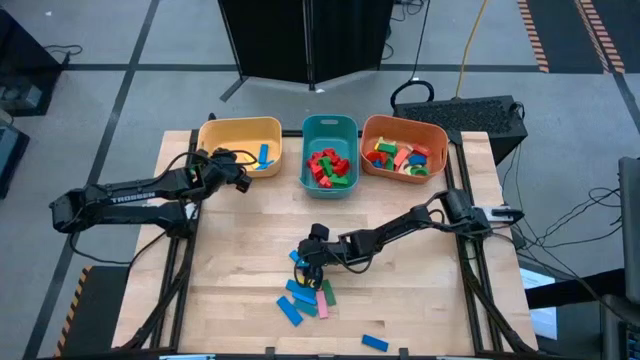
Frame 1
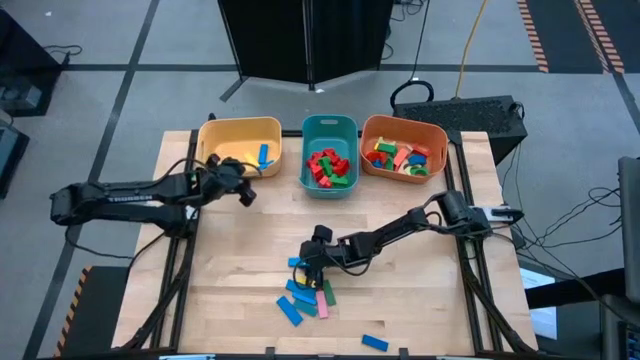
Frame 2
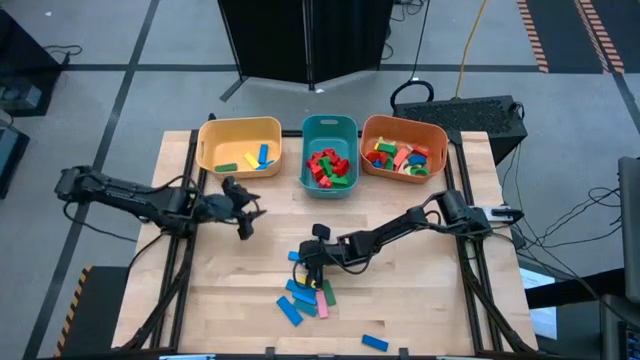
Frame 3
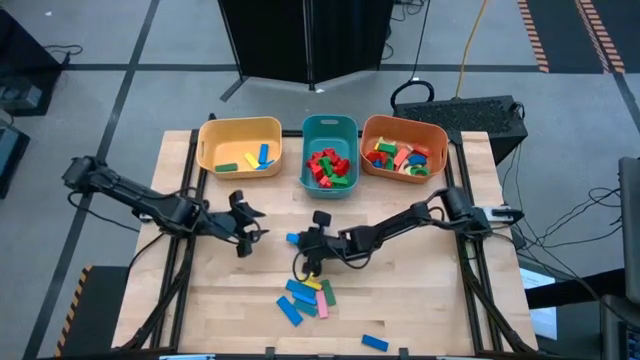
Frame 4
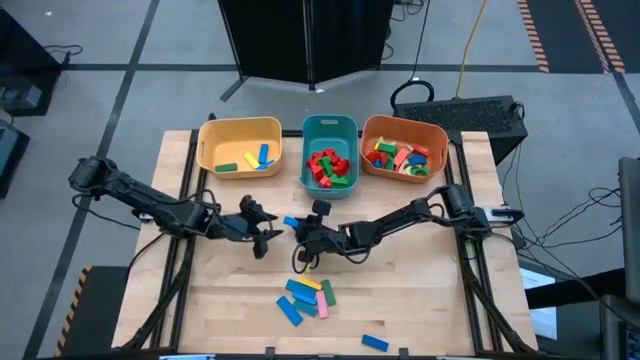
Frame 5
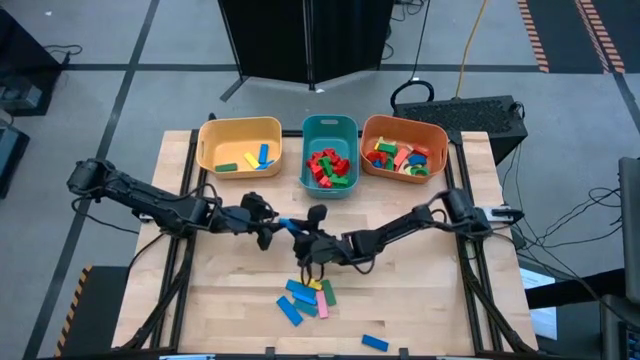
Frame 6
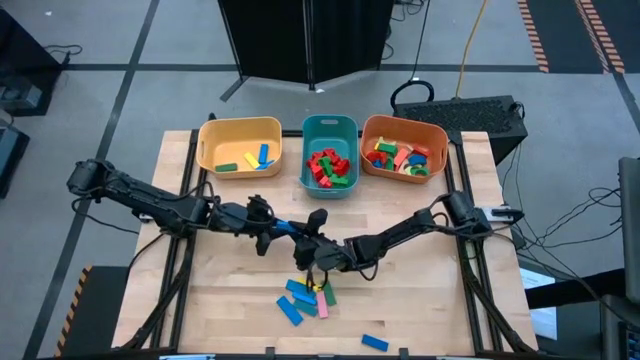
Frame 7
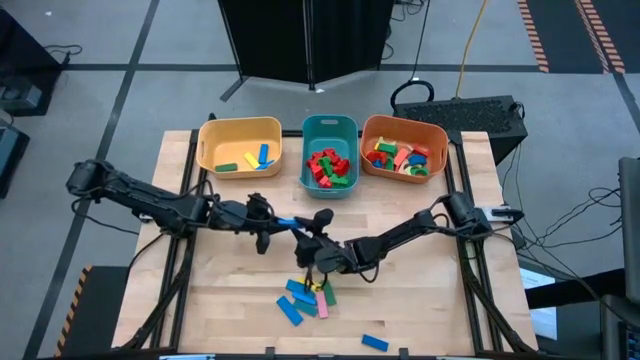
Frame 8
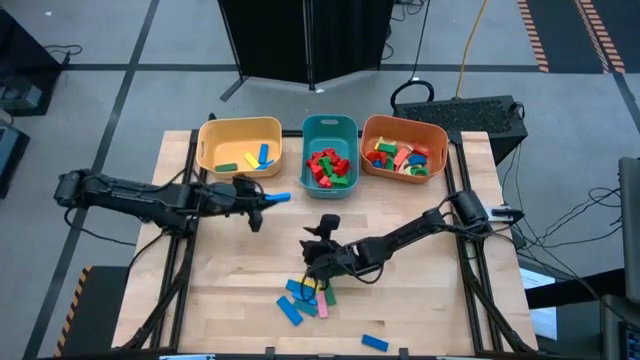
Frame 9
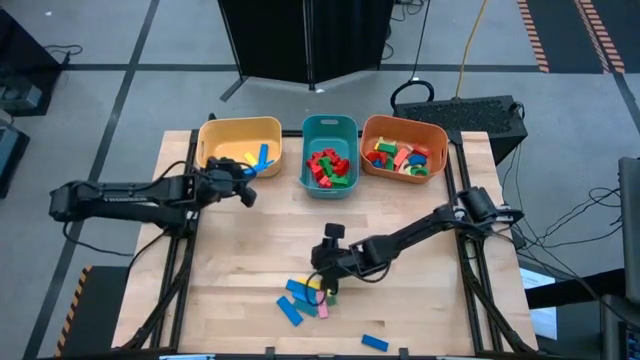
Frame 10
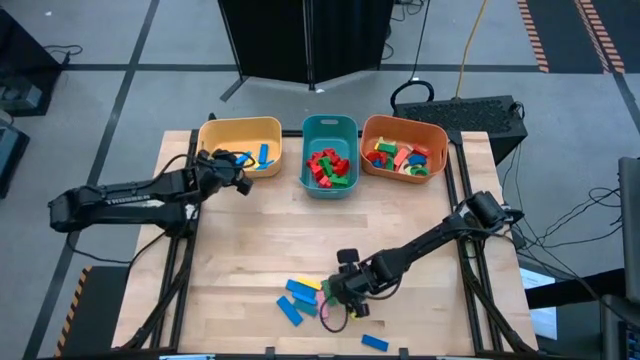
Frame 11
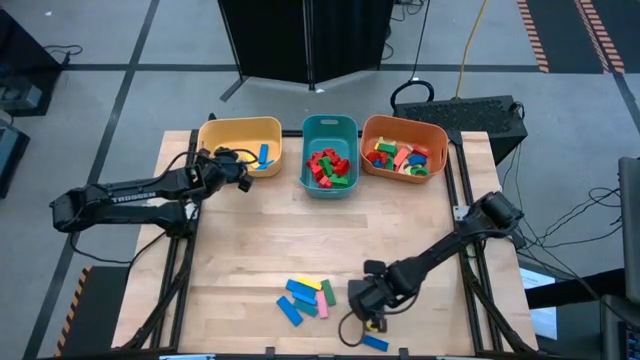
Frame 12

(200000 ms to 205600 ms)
Task: Sort blocks by size
Put the blue rectangle block into the yellow bin

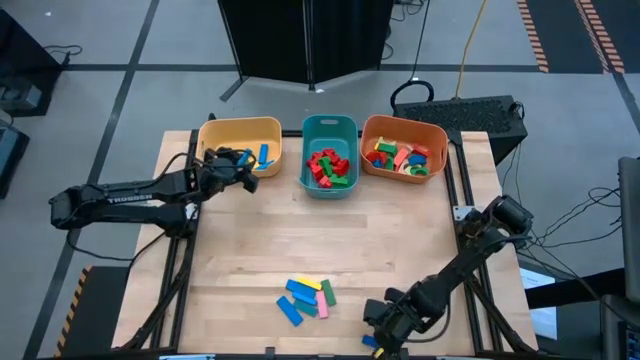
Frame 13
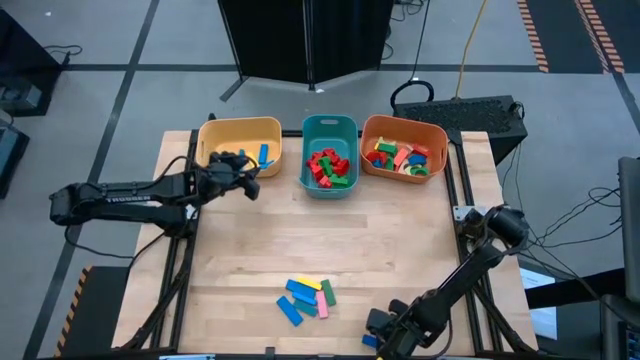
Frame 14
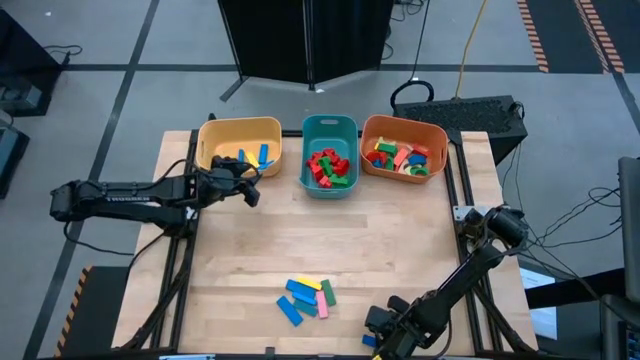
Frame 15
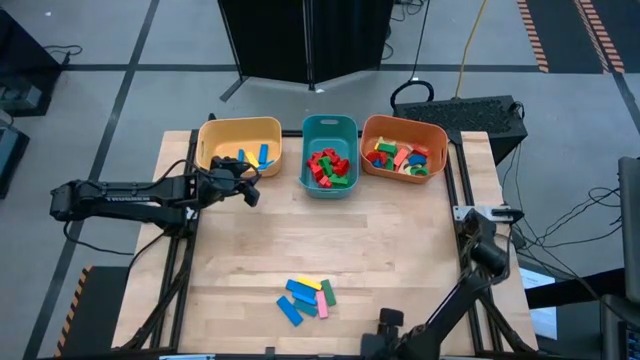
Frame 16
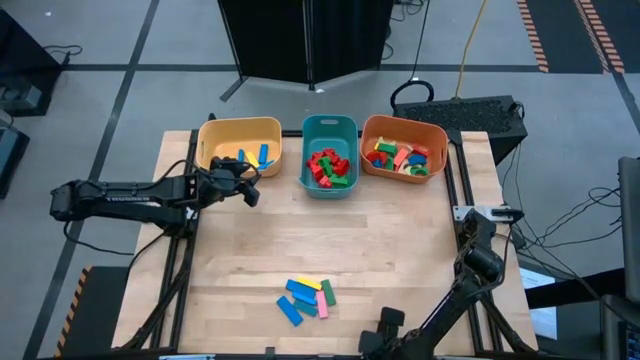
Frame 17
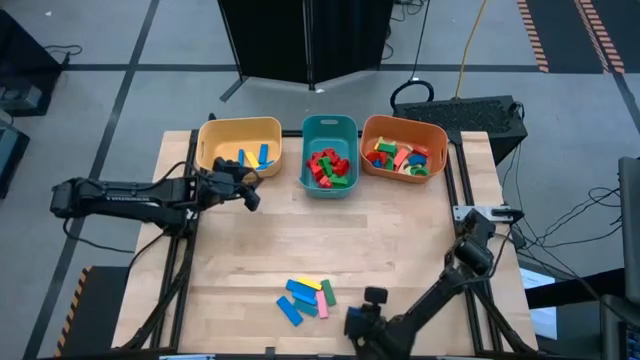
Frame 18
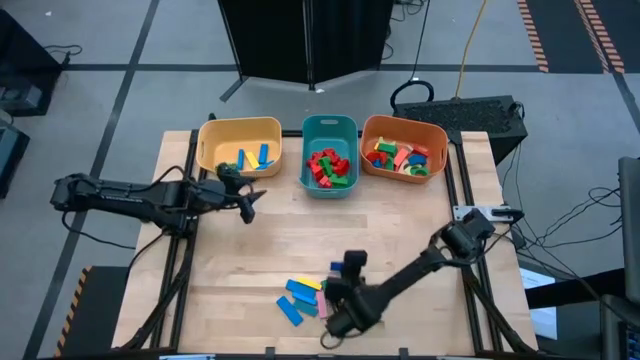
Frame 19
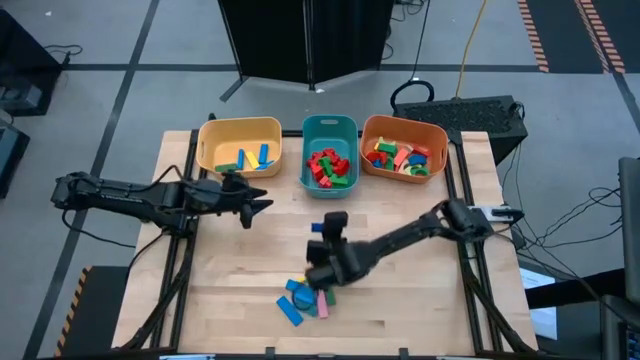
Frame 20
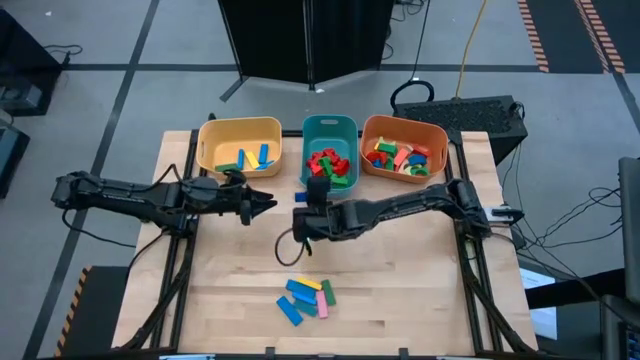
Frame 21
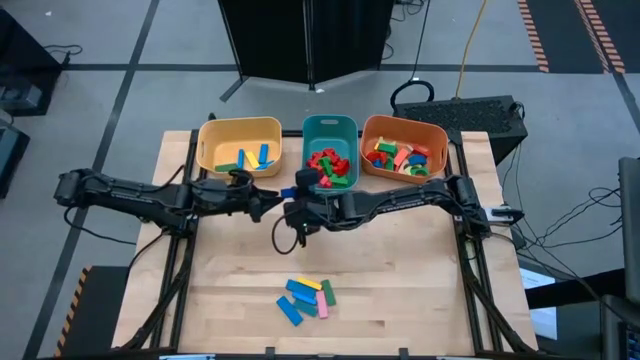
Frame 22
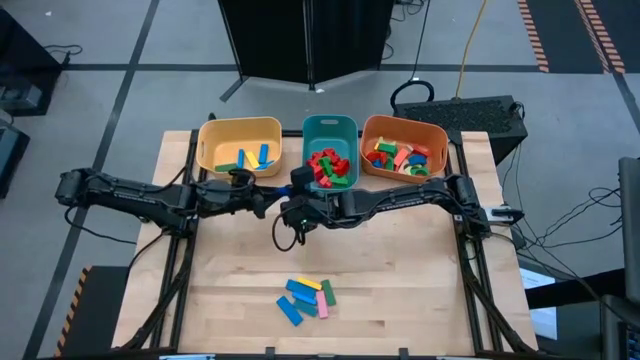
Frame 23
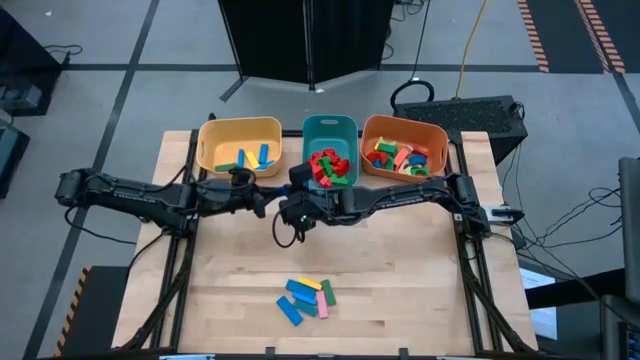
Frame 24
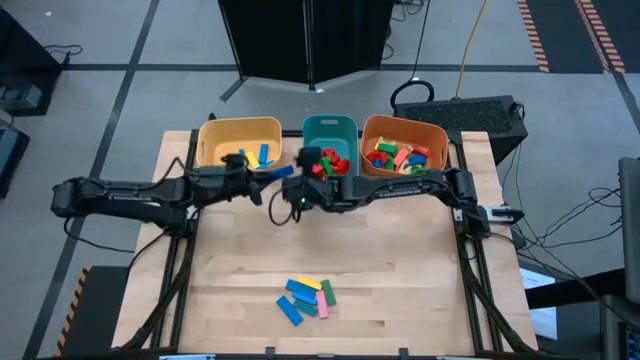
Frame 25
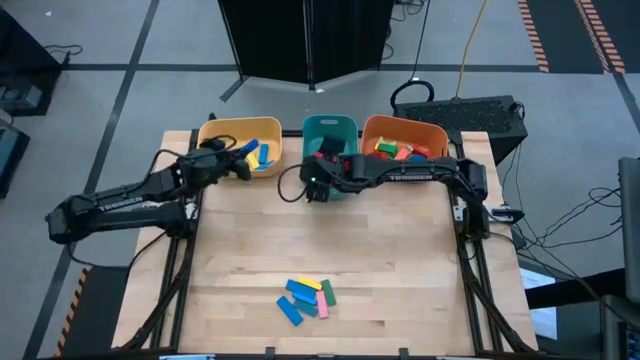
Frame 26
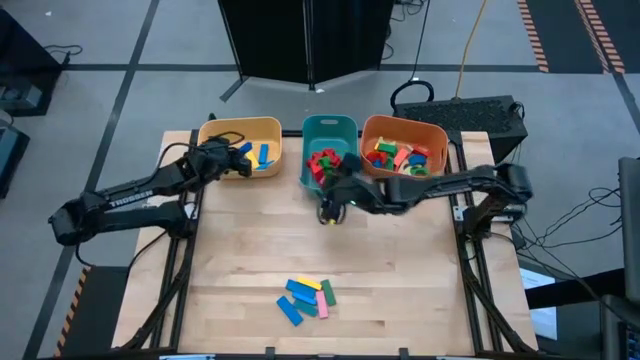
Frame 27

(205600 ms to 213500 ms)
Put the blue rectangle block into the yellow bin

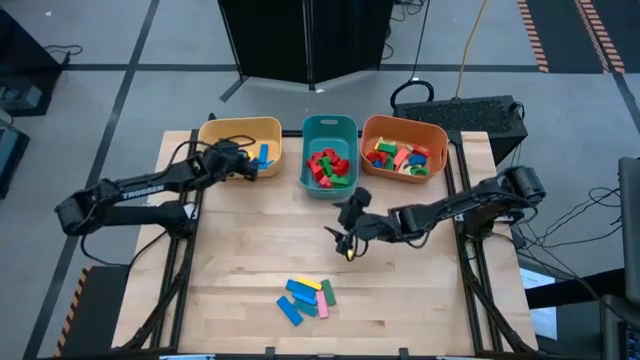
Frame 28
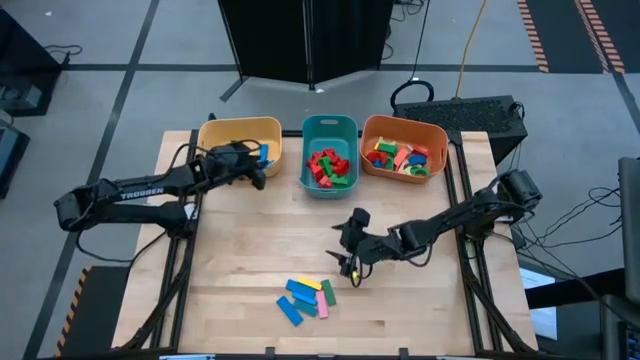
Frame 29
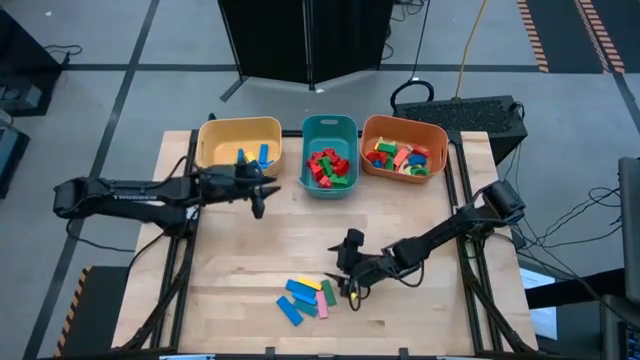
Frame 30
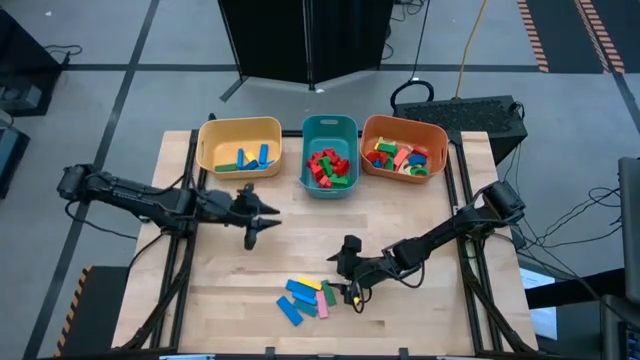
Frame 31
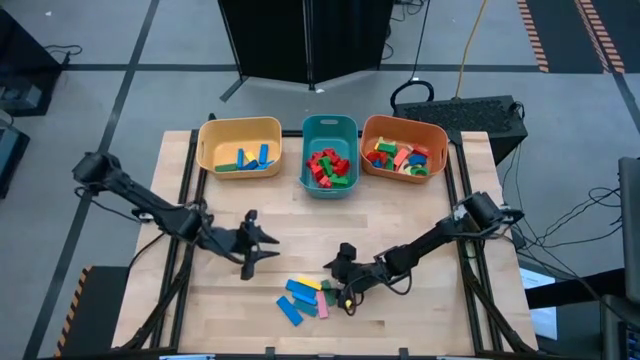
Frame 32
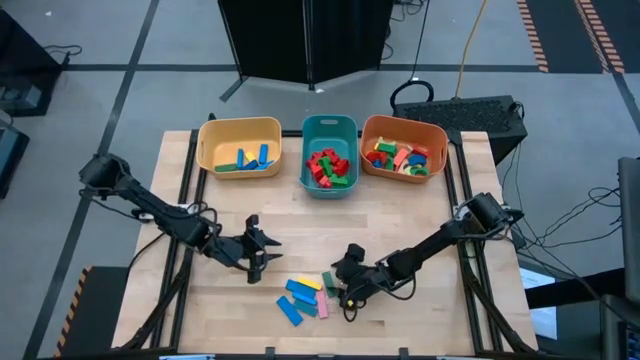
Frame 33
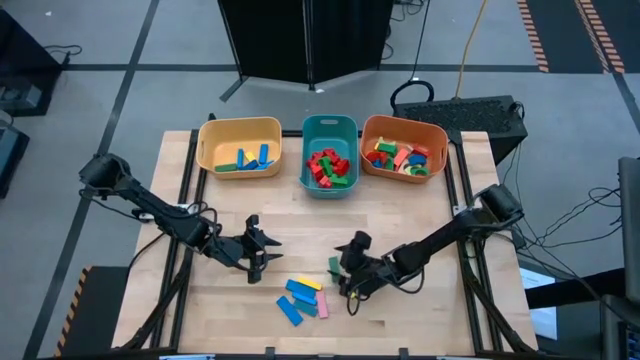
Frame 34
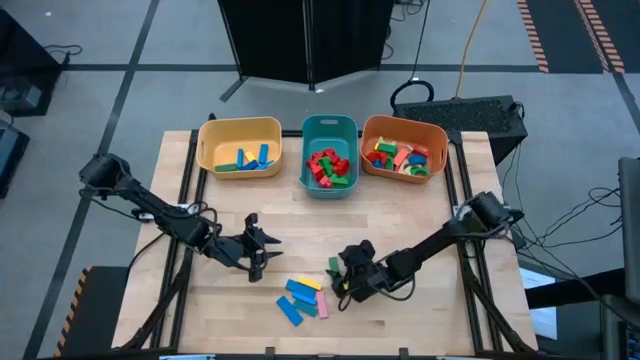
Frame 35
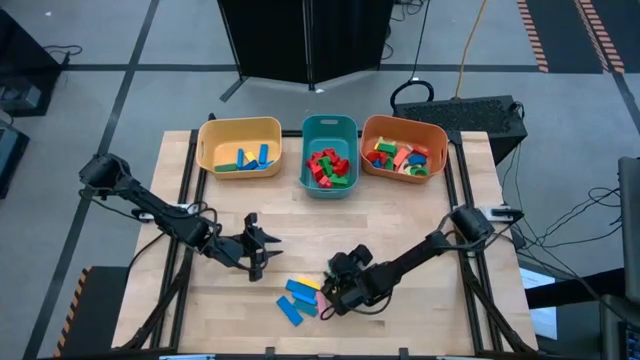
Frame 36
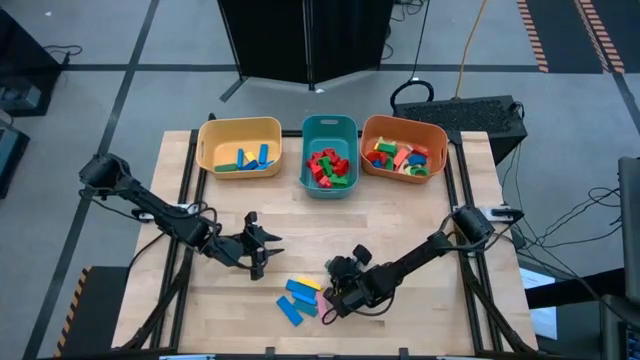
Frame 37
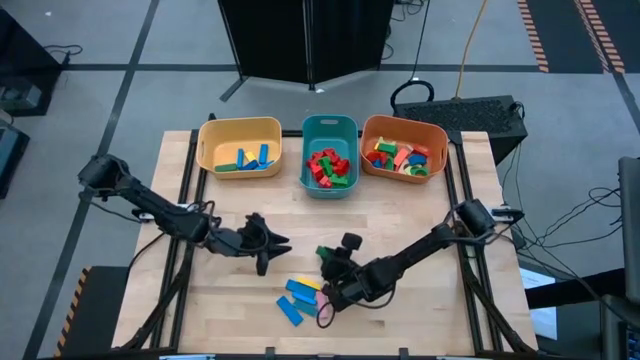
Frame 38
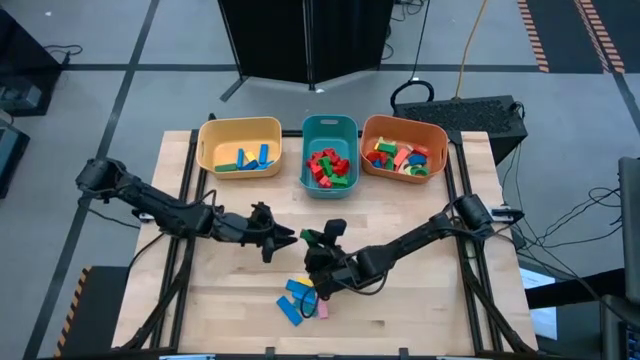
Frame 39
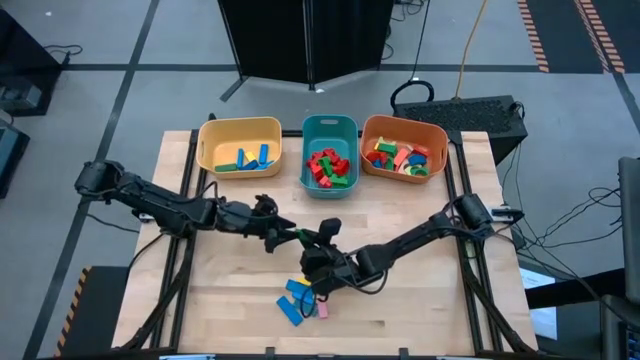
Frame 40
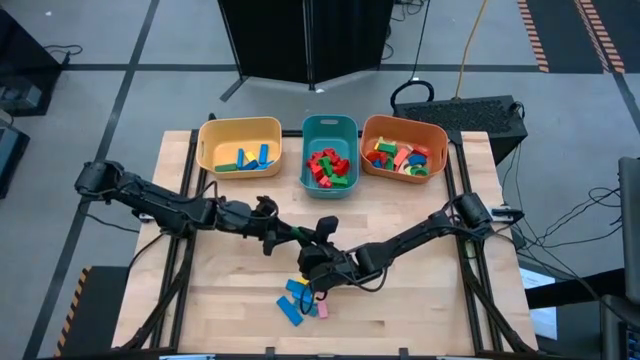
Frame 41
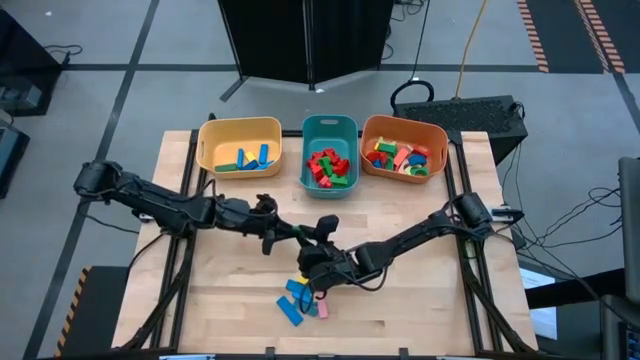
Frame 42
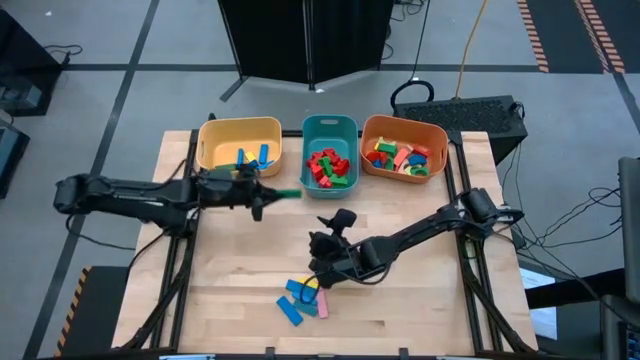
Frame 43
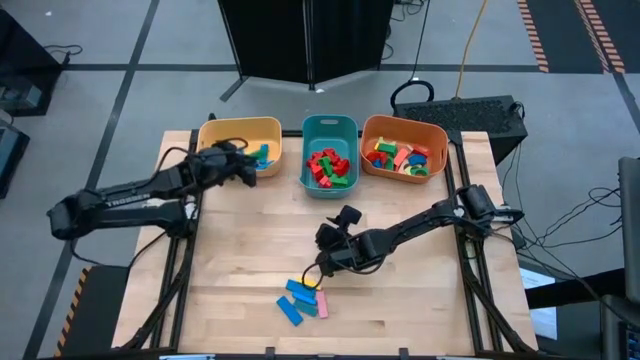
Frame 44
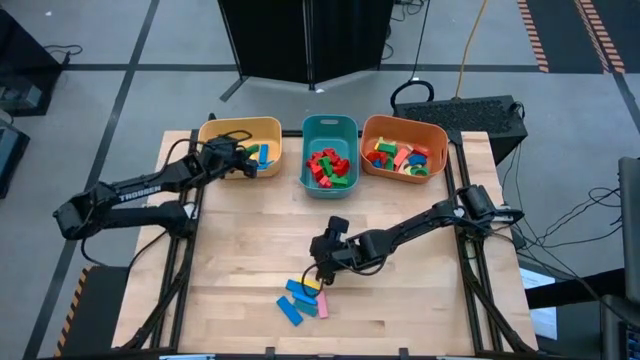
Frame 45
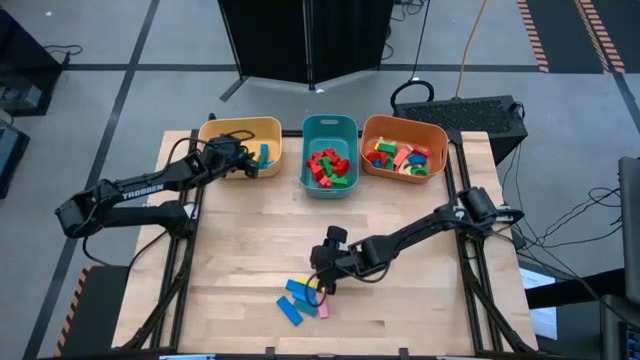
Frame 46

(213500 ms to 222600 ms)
Put the green rectangle block into the yellow bin
